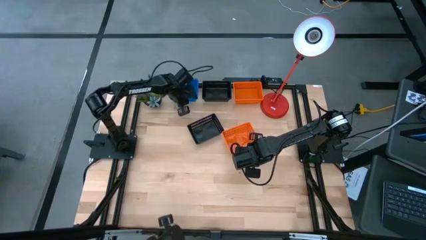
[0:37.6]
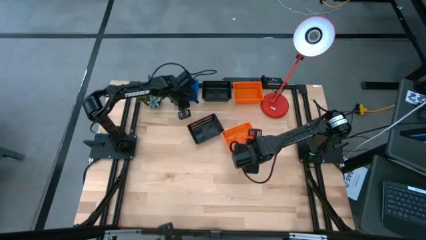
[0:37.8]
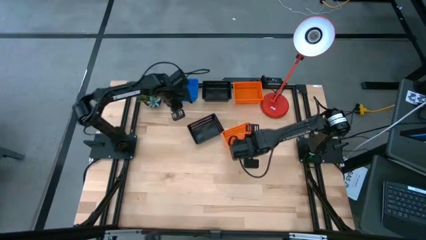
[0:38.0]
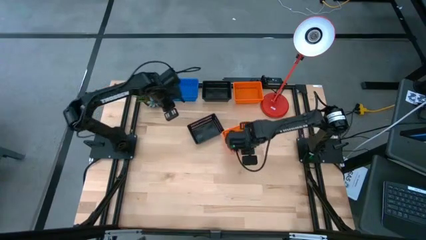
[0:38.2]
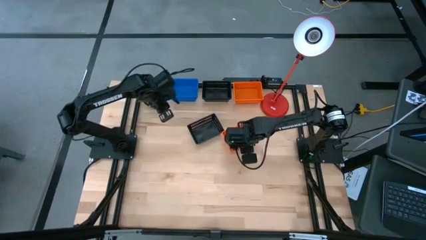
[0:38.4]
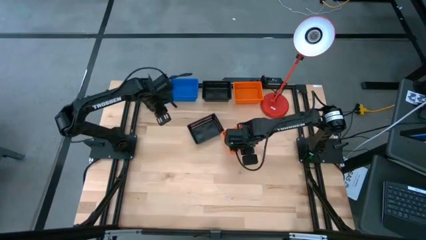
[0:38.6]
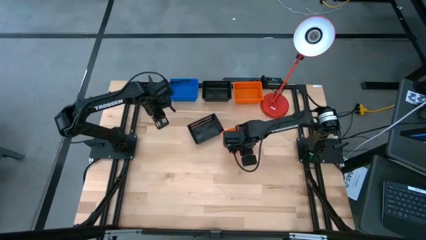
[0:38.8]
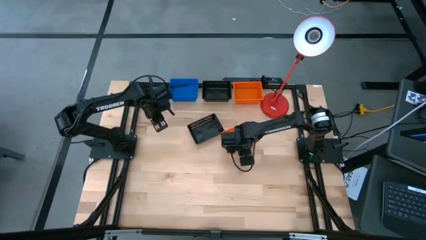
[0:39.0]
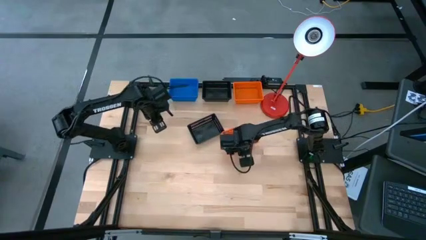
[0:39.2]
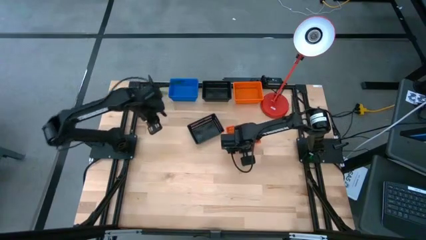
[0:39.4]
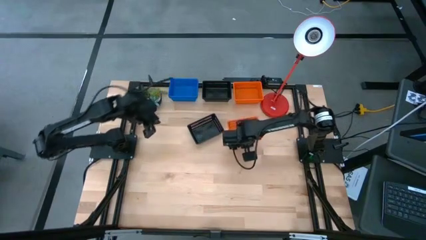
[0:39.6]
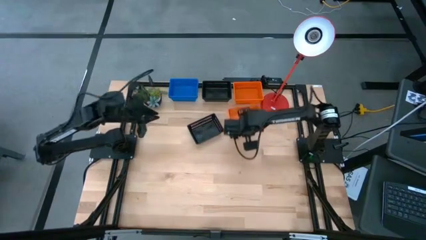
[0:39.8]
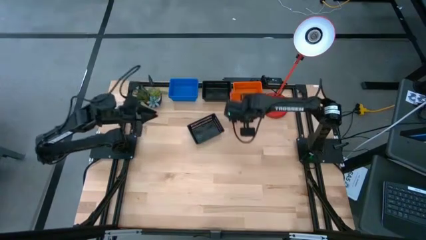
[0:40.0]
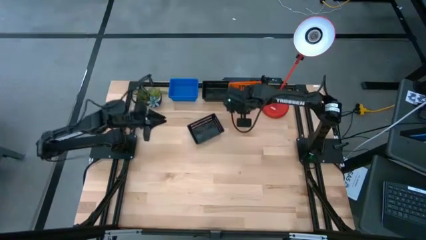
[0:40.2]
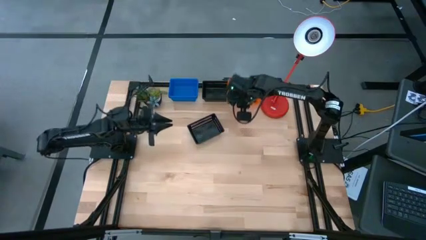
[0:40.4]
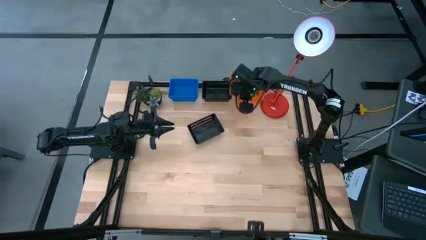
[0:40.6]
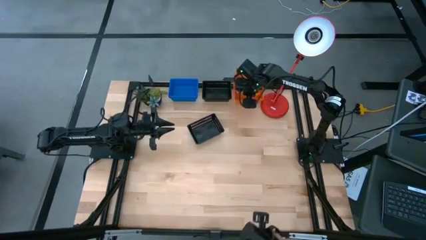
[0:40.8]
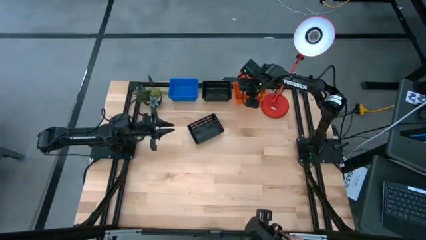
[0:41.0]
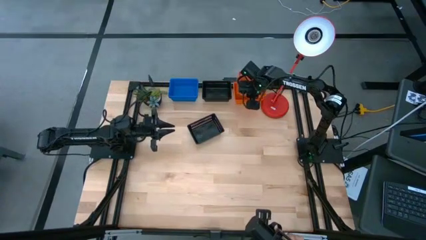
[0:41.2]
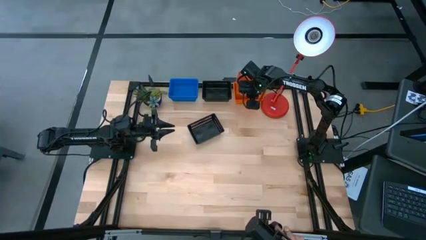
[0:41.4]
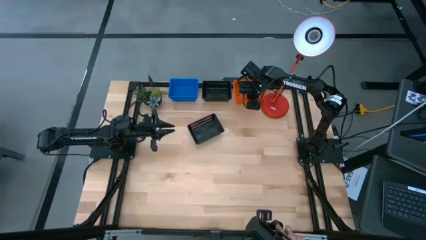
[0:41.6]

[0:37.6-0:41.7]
Stack the bottom orange bin on top of the top orange bins

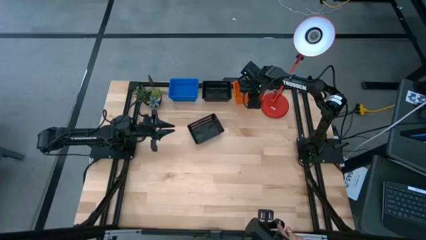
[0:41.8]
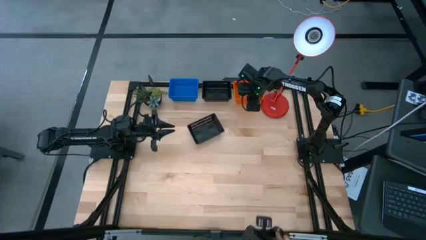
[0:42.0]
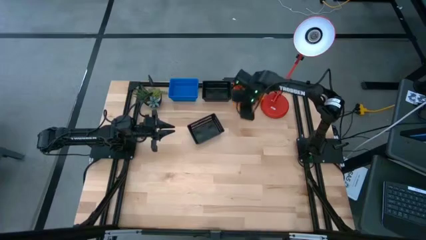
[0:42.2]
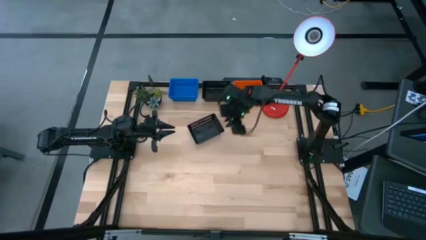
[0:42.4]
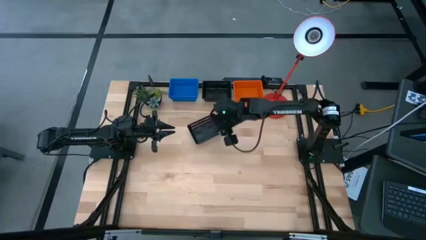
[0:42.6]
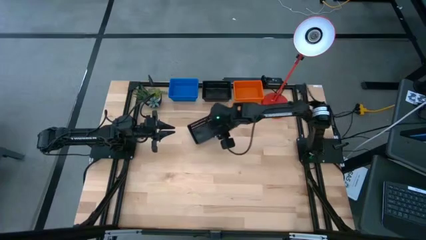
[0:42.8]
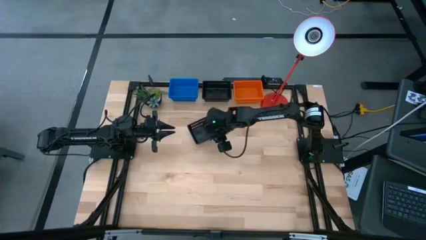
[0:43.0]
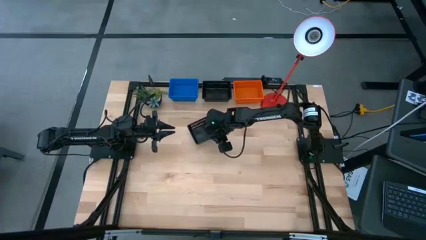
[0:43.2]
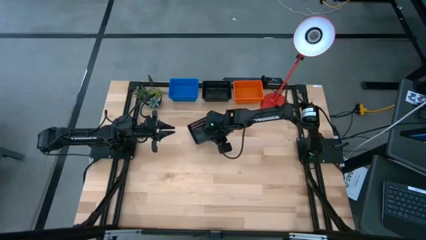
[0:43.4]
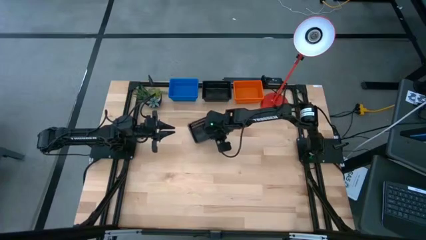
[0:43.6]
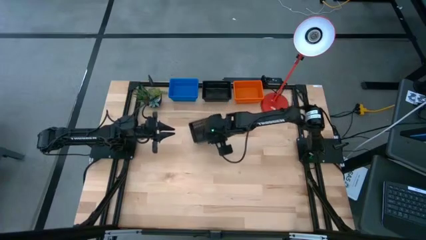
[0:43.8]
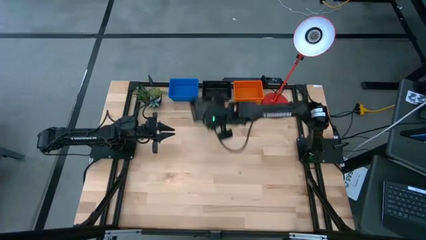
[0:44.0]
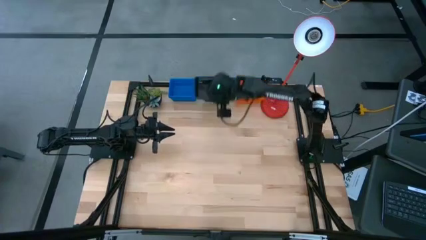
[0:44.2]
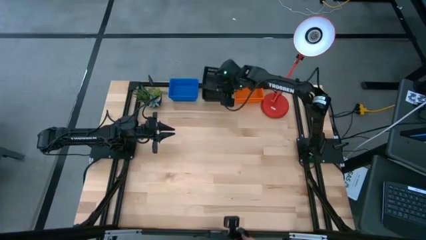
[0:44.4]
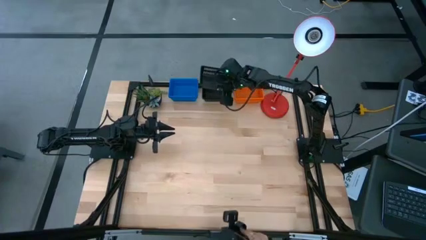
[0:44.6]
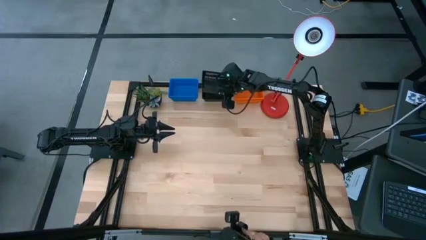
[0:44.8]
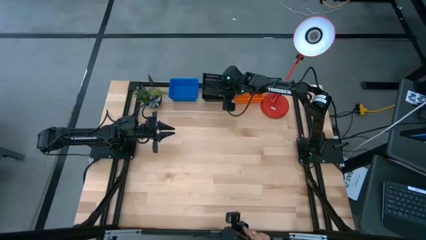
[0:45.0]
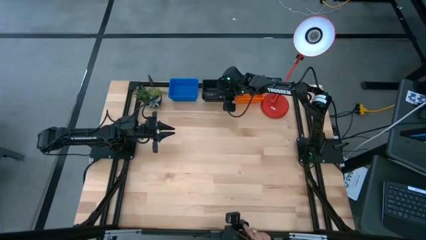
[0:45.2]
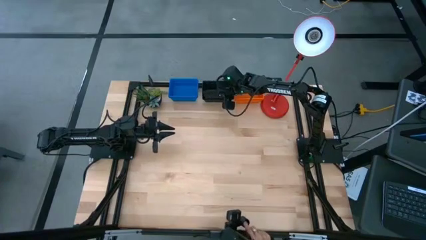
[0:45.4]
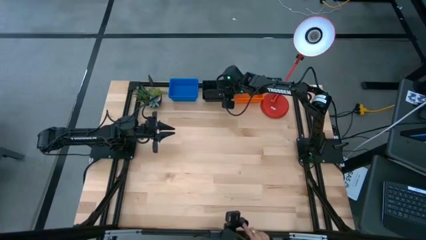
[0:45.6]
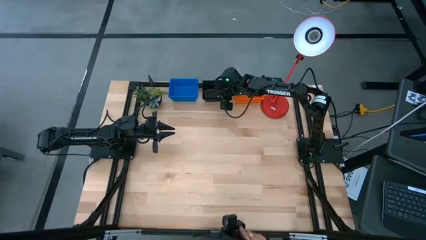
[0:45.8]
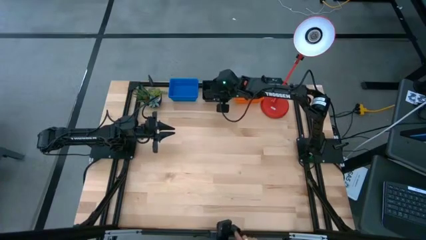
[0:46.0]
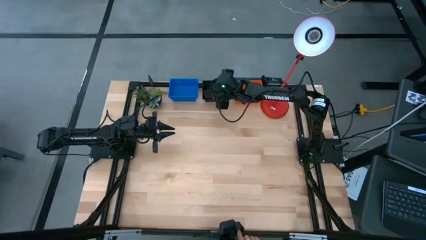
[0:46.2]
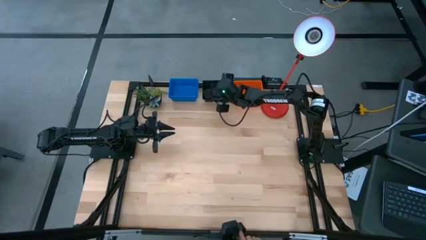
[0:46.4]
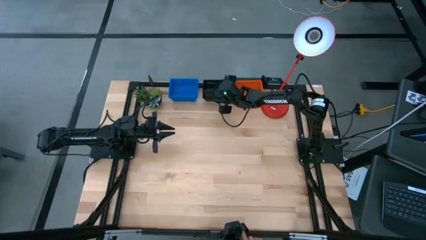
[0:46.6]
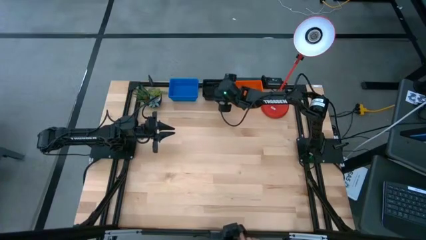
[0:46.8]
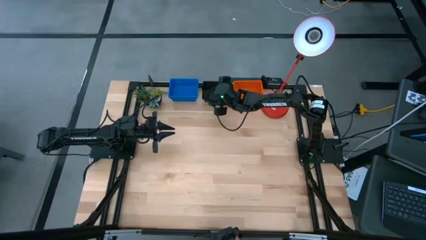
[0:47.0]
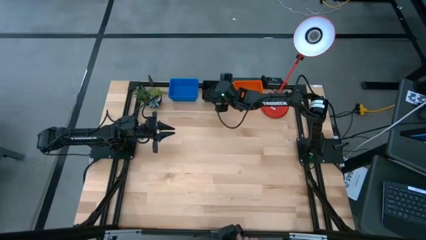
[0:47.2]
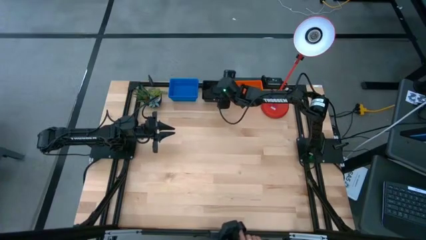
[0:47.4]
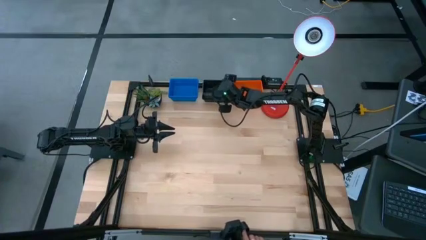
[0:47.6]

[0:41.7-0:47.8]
Stack the bottom black bin on top of the top black bins

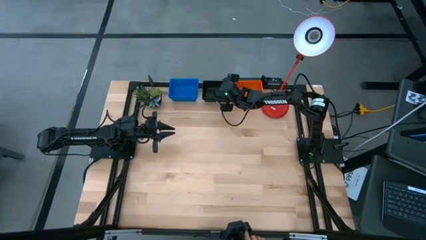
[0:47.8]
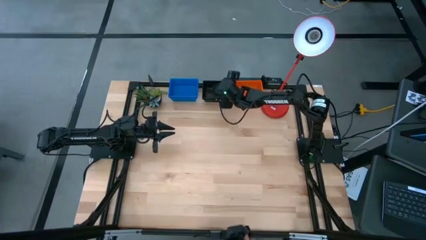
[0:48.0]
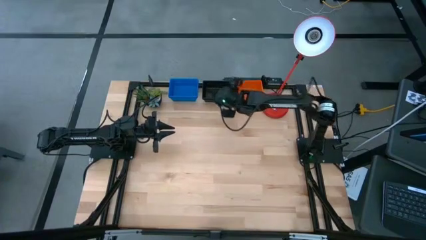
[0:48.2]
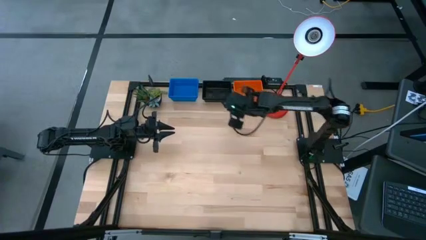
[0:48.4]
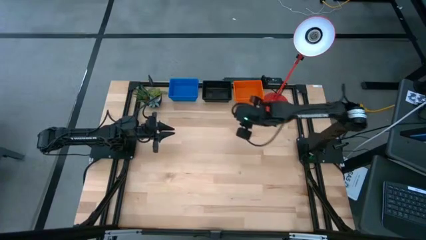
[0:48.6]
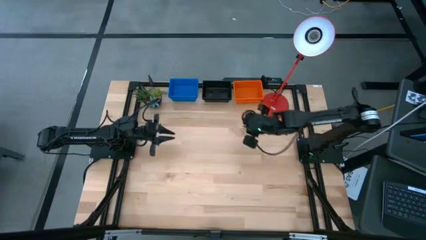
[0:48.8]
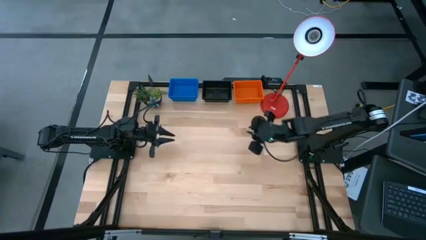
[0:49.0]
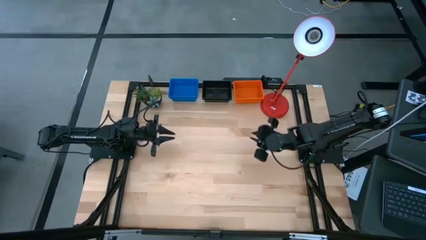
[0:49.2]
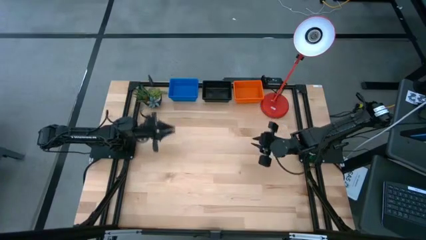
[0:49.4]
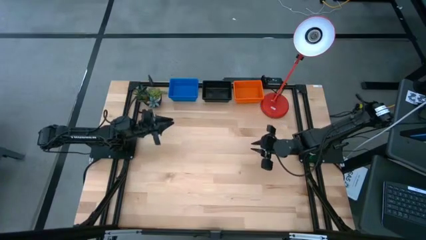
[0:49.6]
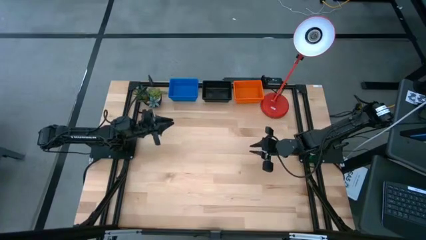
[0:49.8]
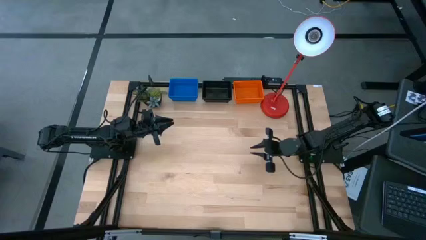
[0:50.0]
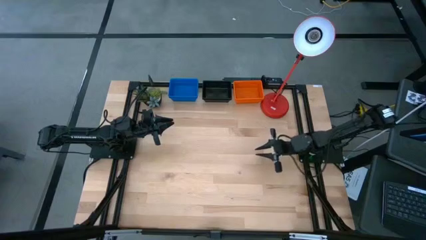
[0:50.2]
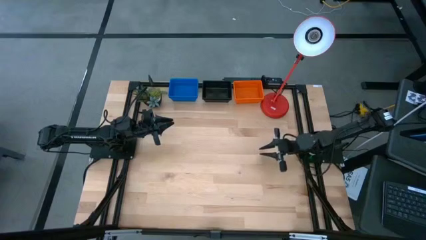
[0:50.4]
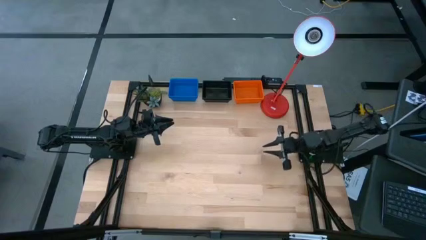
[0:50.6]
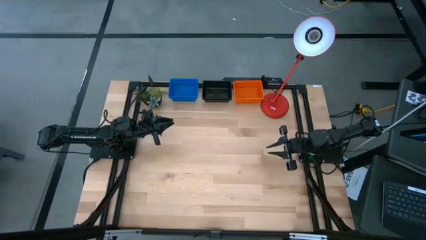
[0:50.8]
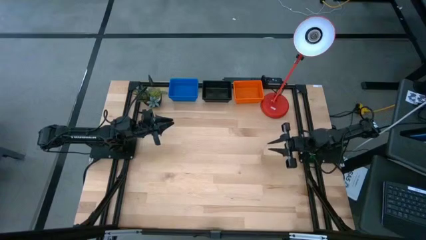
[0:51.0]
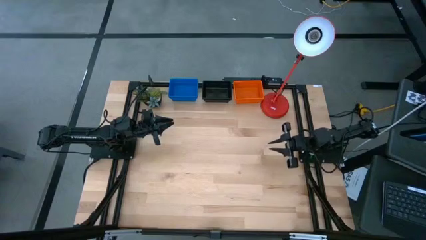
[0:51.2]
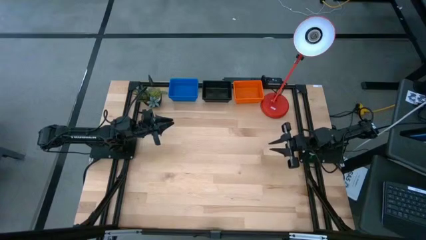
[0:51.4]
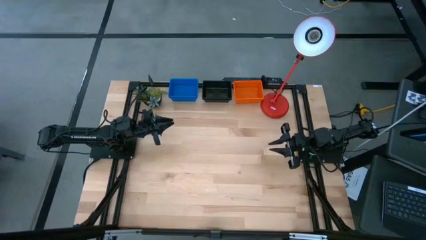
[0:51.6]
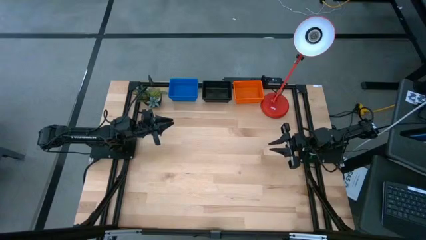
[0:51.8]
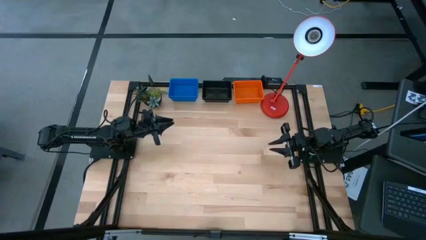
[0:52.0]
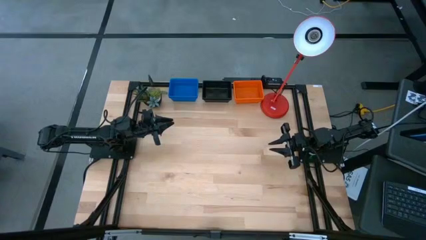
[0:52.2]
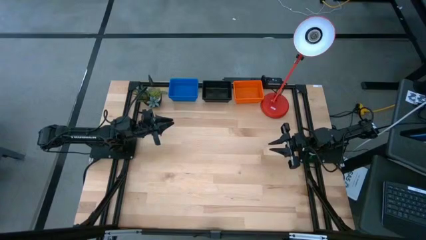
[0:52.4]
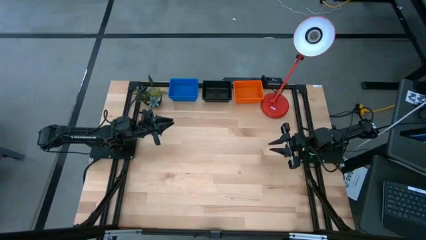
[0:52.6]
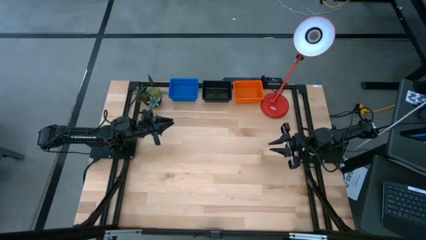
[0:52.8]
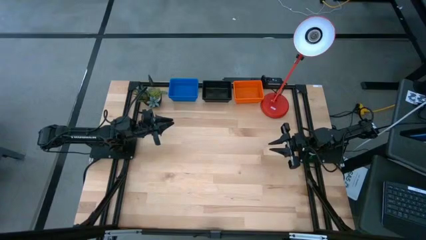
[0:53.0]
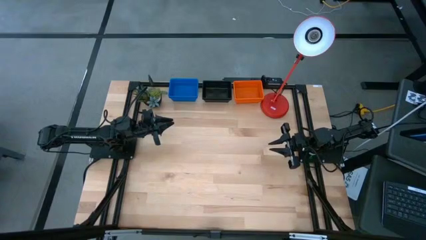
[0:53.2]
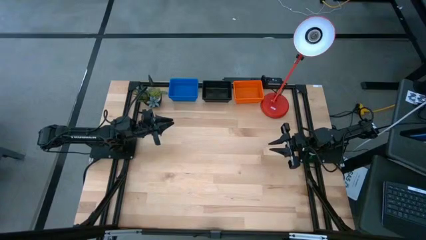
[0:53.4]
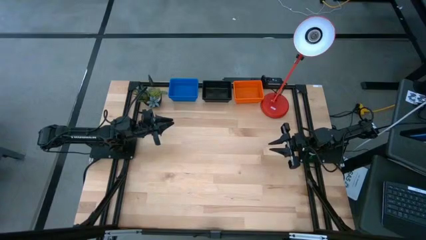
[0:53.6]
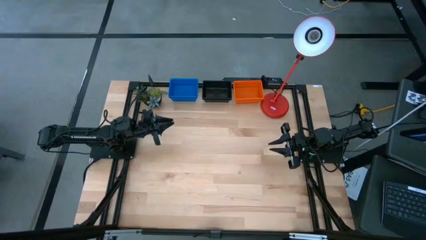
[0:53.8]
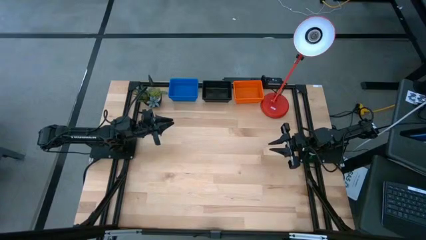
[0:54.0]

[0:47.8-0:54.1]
Return to Home Position
